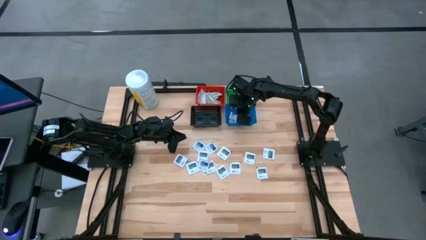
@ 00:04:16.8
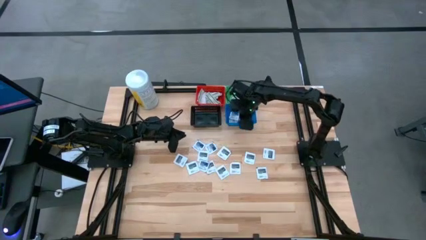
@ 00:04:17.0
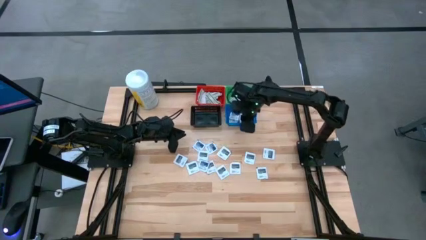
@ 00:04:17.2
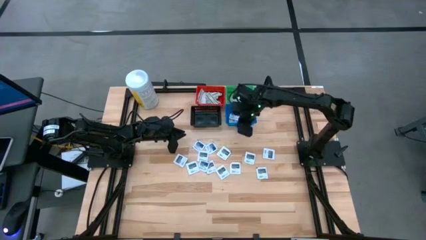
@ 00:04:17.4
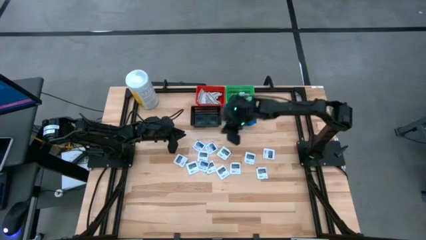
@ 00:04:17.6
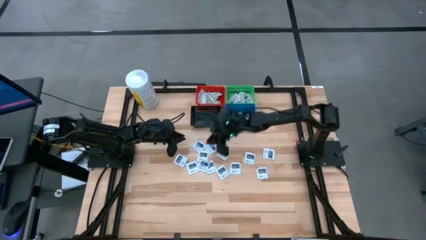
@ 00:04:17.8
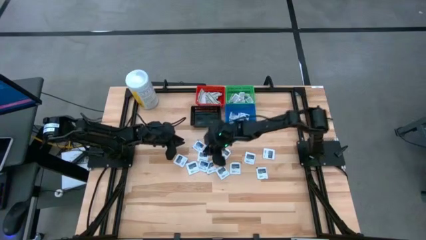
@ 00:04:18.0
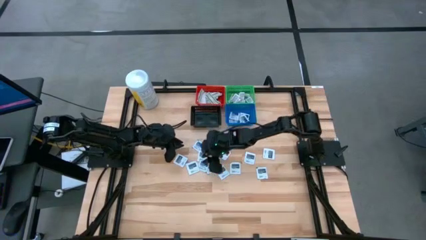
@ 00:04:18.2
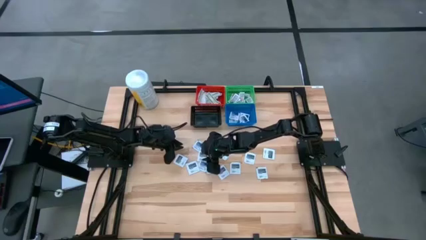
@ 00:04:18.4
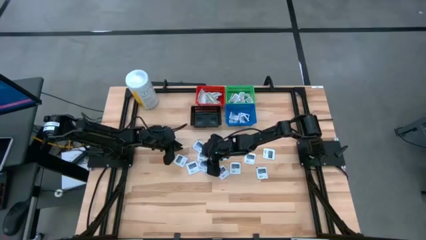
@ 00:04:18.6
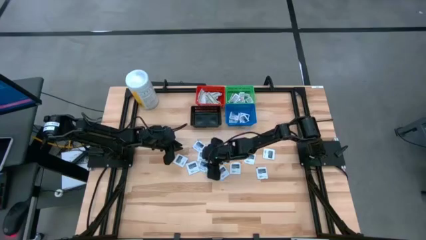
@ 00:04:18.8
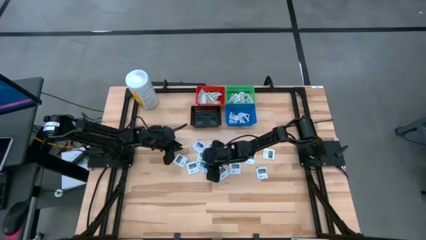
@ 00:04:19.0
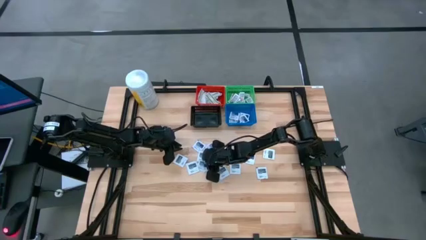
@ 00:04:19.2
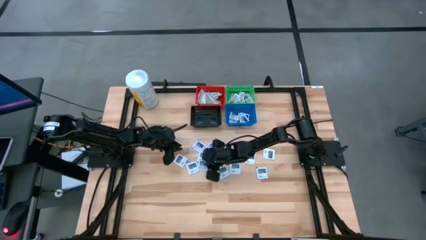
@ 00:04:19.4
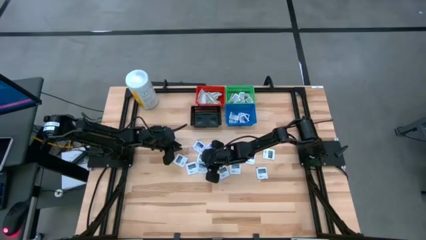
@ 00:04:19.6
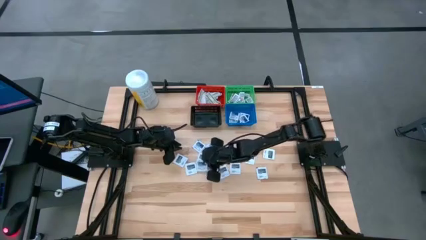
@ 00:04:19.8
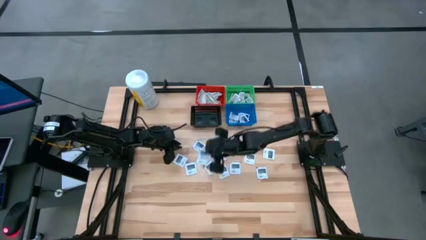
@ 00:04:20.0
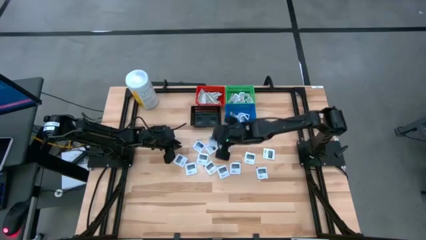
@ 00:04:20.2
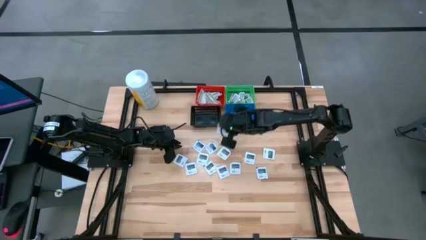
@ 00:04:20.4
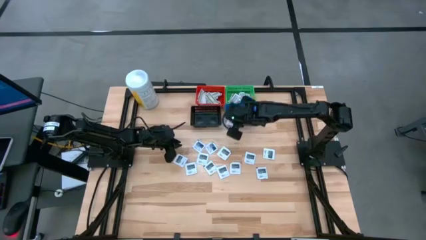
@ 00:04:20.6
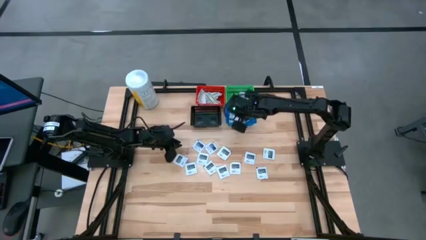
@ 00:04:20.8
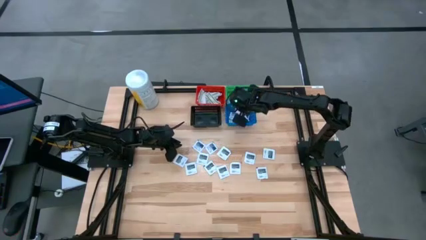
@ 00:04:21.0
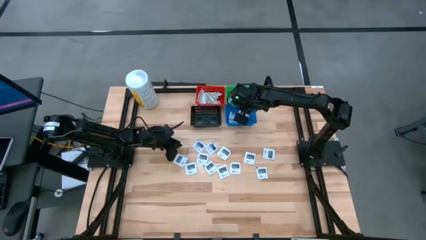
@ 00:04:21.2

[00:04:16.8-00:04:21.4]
Task: Pick & Place First Aid Supplies
Put the alcohol pad into the blue basket

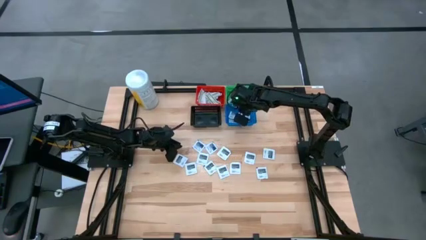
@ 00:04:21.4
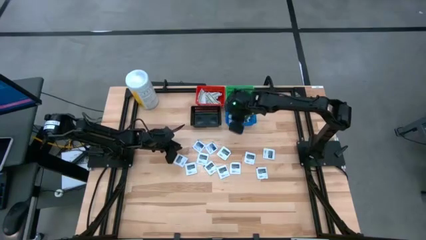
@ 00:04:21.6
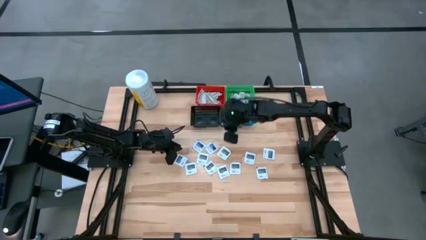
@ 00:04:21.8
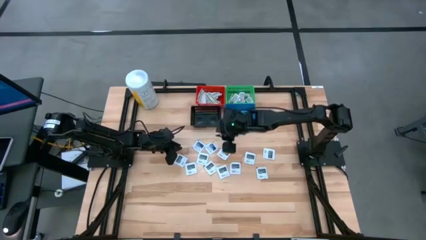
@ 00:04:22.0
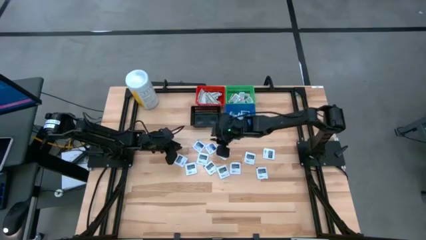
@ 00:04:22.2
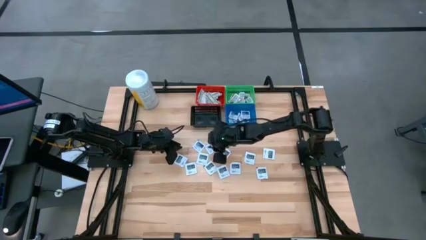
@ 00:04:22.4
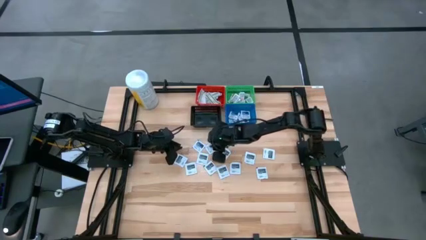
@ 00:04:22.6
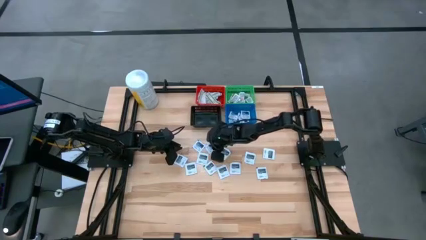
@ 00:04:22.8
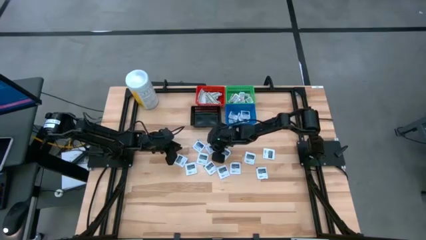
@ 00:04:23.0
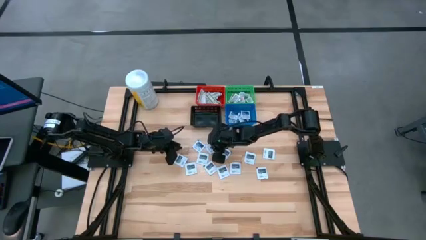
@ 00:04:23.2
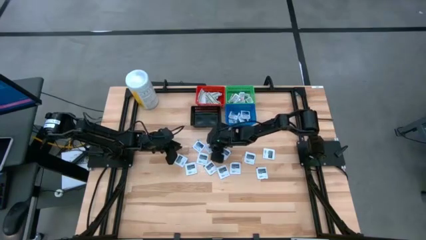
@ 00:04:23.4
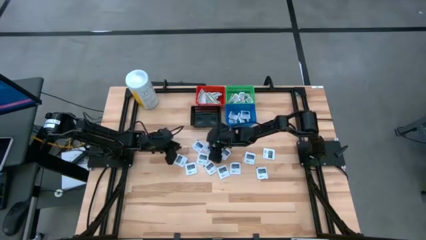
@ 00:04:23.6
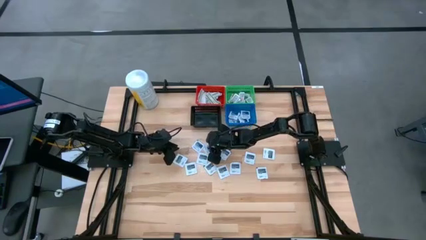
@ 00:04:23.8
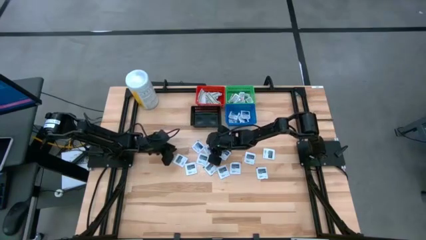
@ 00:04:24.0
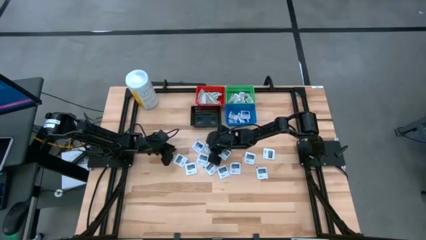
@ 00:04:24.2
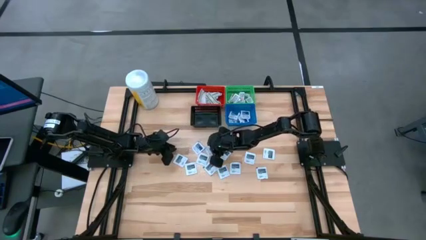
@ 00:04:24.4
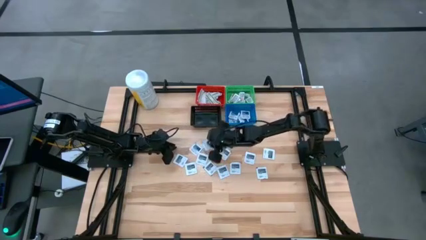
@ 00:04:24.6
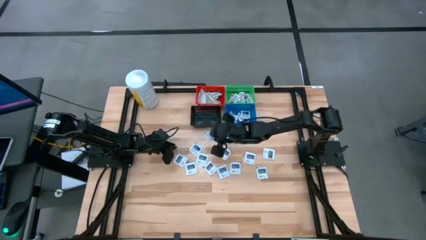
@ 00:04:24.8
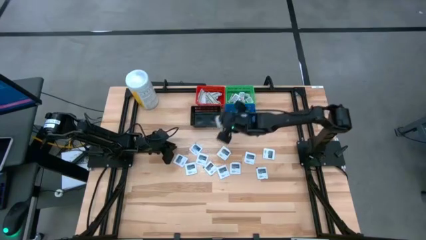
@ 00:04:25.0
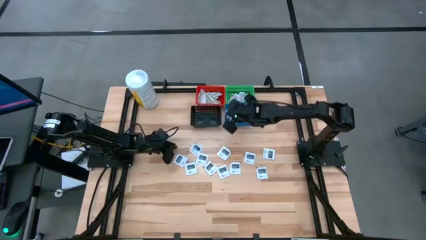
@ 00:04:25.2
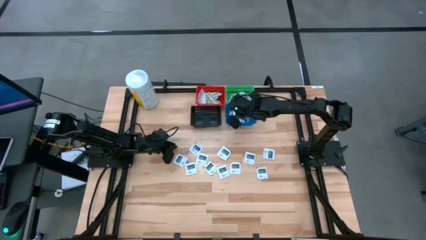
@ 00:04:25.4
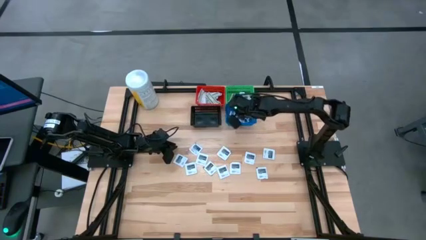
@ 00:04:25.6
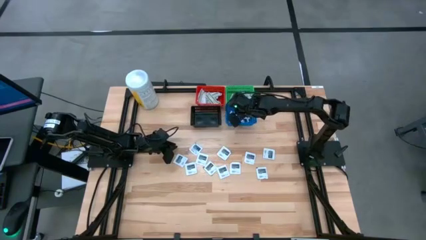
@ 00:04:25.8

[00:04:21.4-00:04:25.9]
Put the alcohol pad into the blue basket

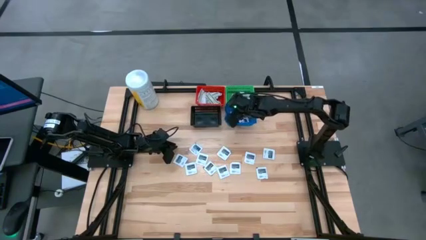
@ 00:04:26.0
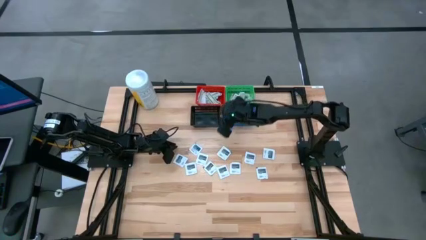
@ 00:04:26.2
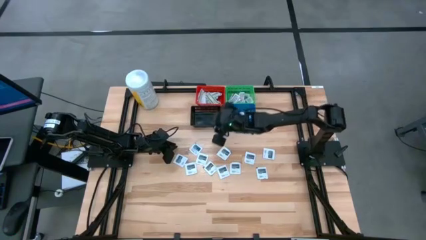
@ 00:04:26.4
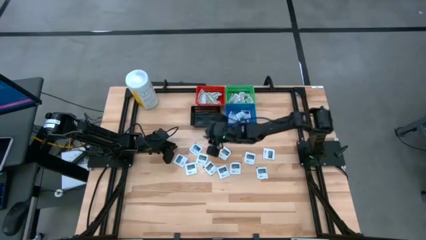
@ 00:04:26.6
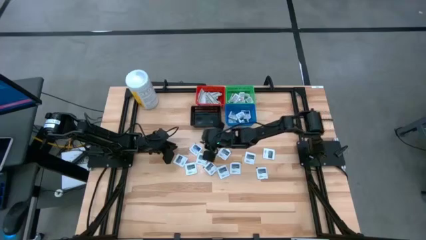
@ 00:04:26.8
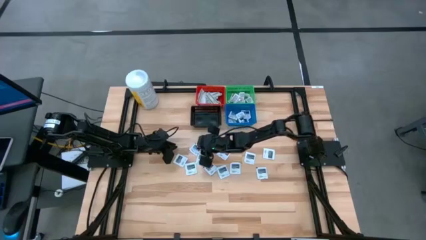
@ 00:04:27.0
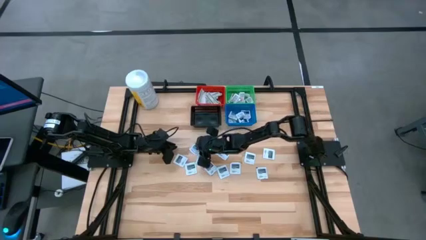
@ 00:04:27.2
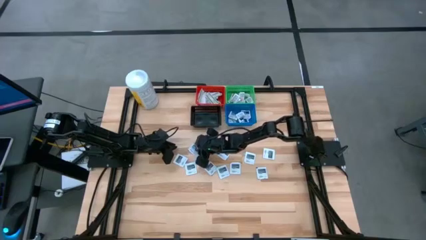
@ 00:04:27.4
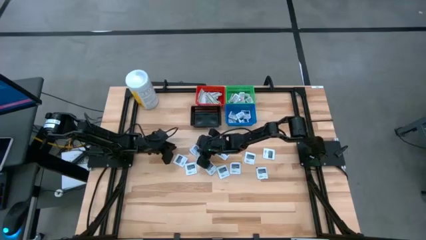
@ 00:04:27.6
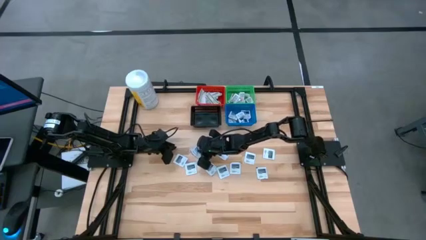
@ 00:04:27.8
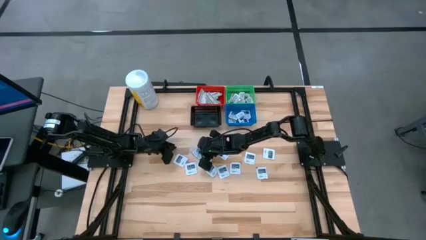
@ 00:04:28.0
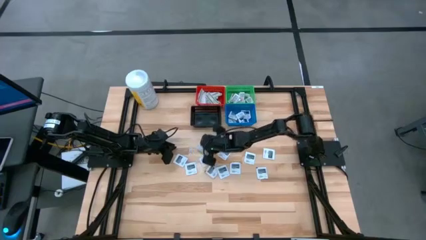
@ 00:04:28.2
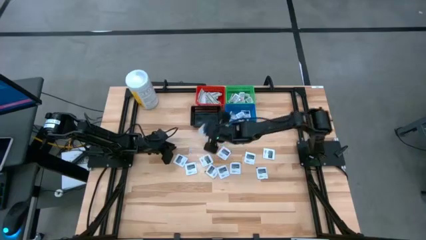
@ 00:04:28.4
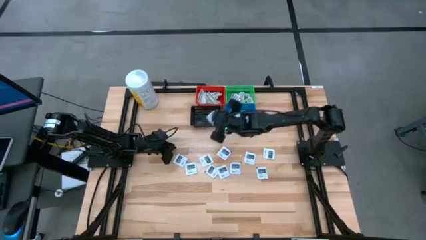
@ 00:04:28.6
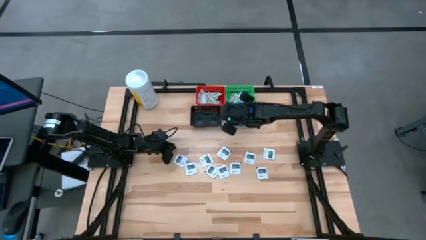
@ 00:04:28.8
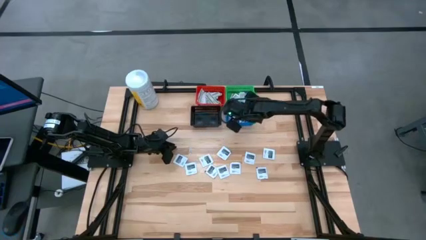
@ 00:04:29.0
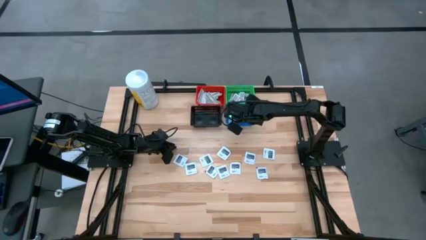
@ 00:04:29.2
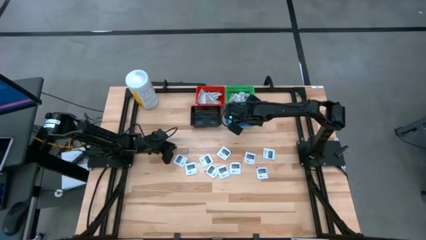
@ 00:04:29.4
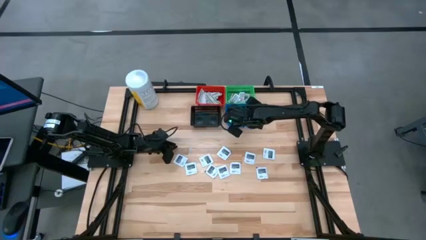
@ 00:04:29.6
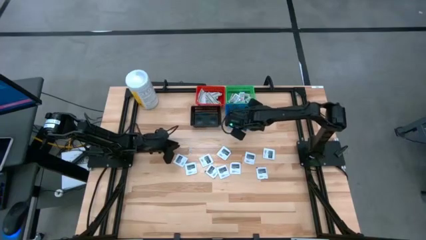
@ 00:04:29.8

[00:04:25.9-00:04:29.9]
Put the alcohol pad into the blue basket

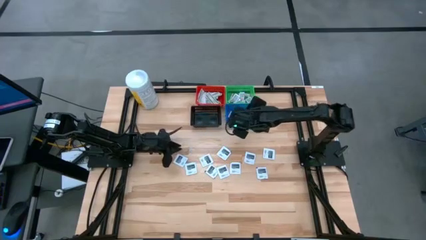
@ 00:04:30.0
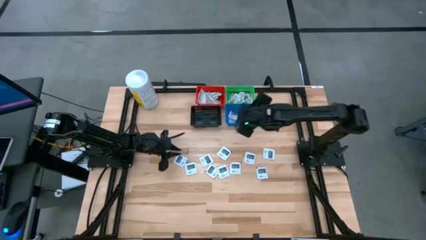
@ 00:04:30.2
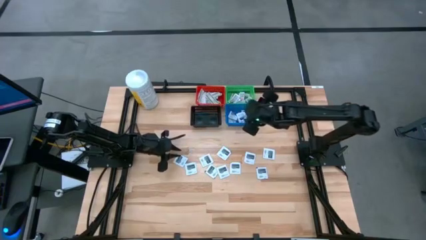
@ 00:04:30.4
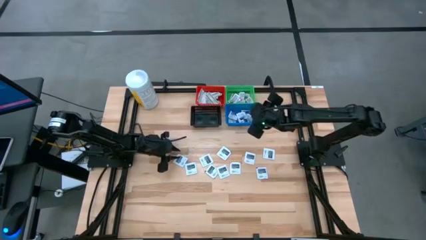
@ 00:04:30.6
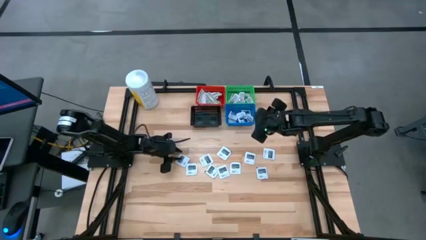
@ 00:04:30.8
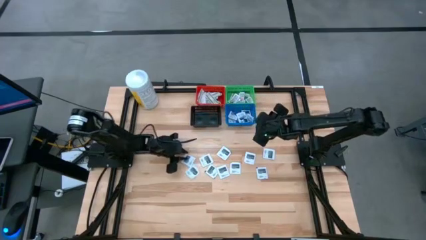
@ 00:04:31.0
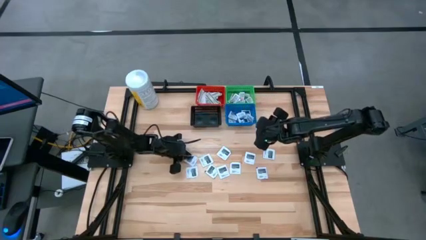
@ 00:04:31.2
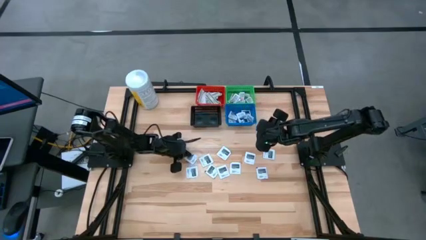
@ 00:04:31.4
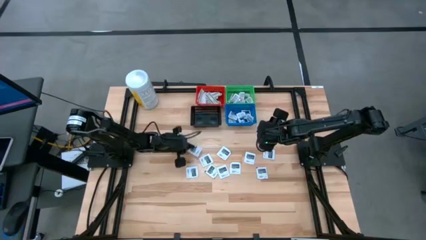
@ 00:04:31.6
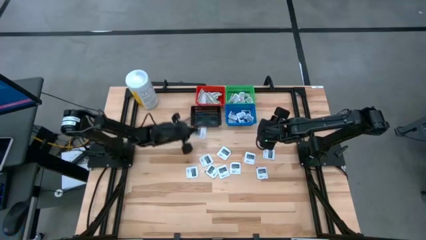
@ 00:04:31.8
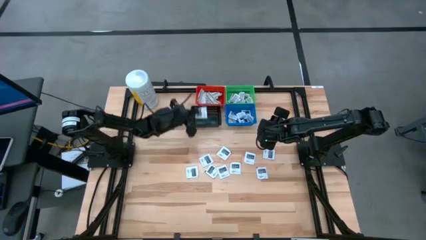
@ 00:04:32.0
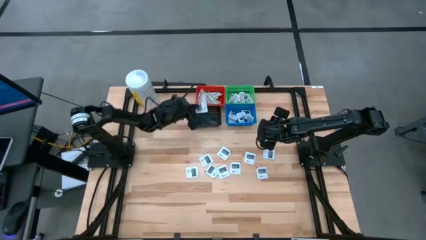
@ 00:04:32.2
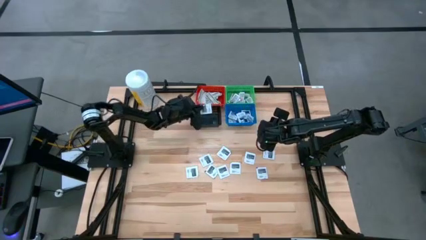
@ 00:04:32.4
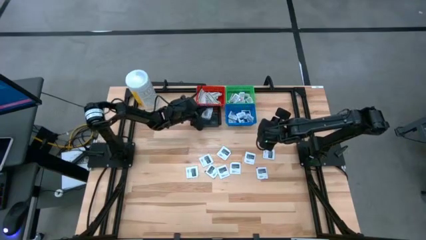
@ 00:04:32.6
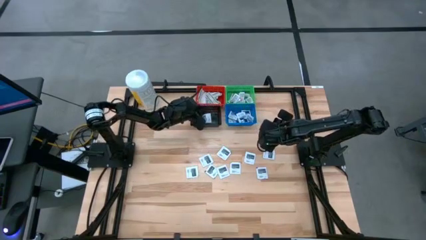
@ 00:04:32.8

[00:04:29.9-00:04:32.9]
Put the towelette pack into the black basket
